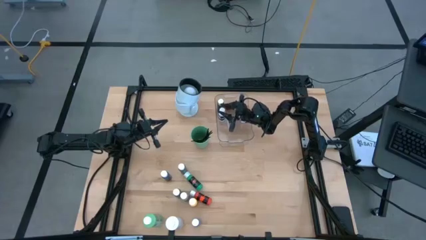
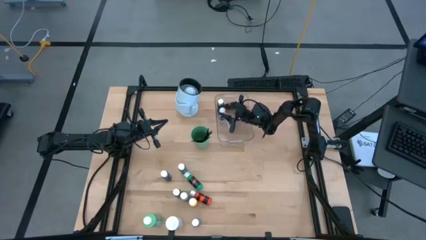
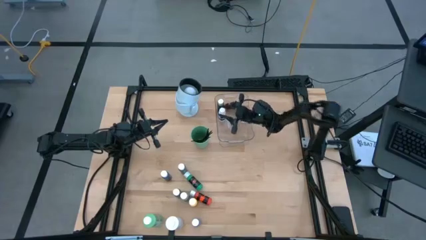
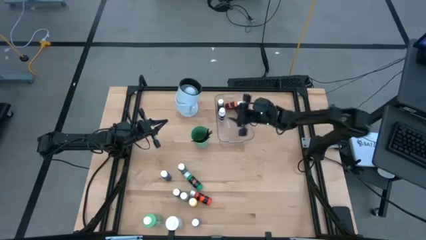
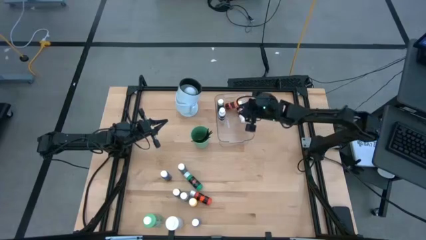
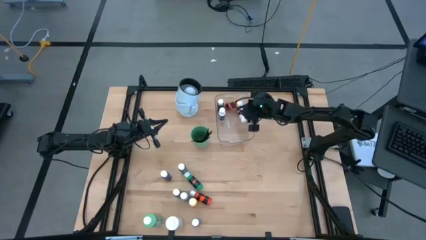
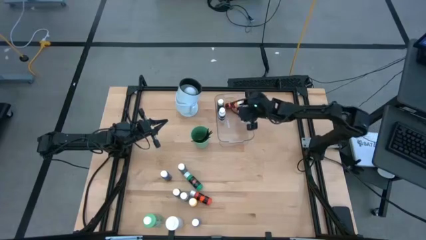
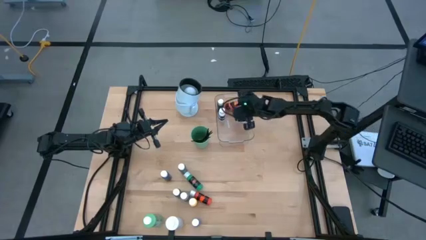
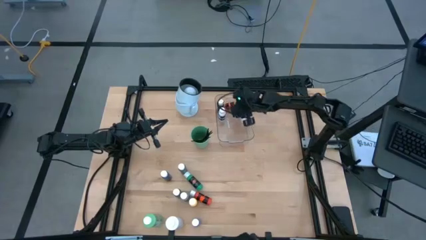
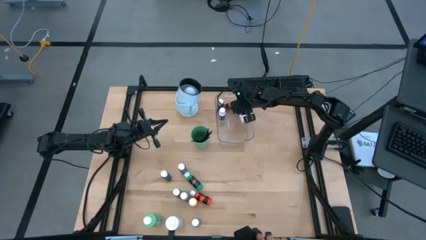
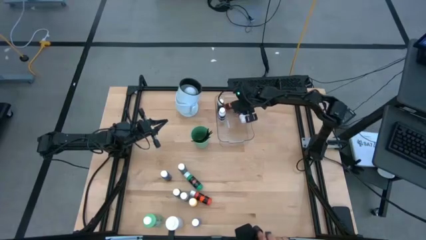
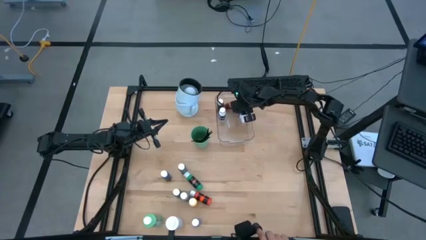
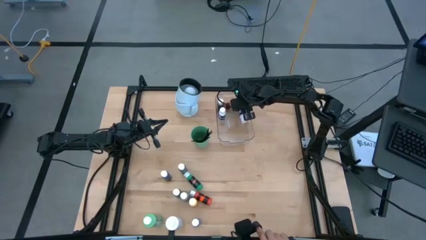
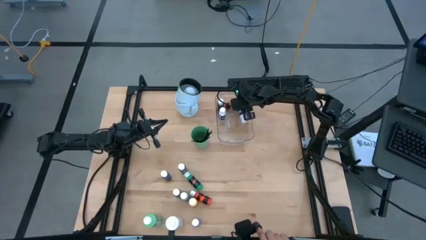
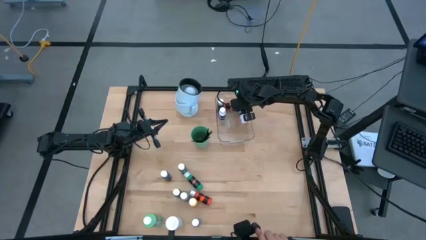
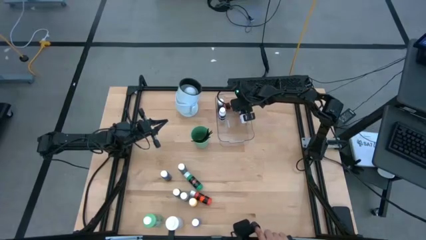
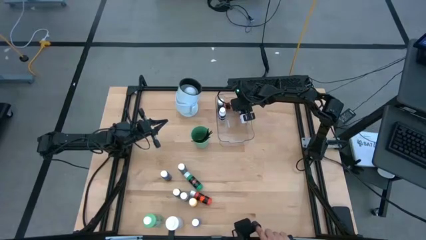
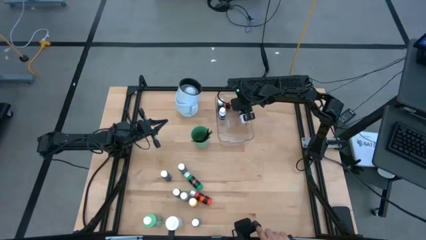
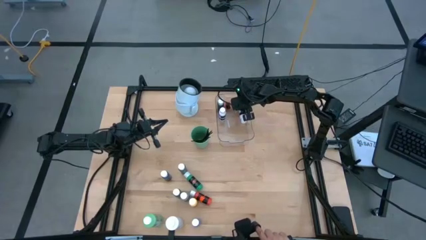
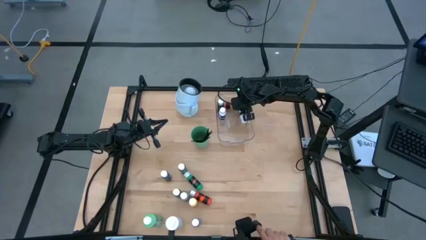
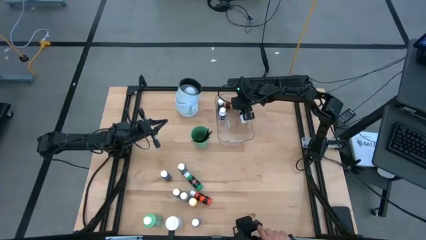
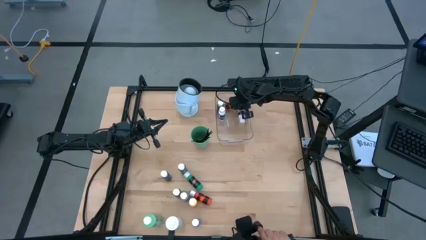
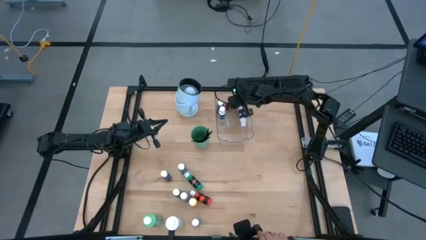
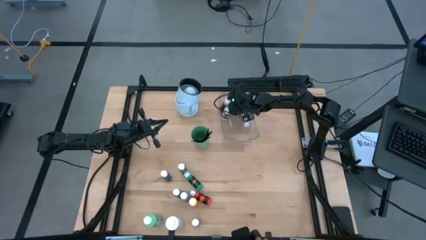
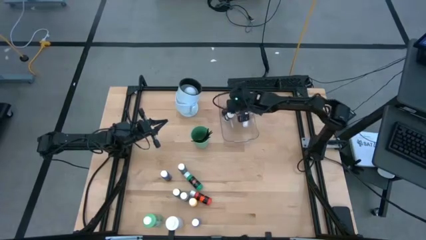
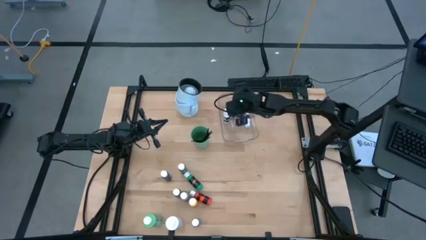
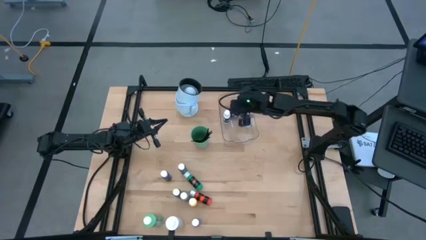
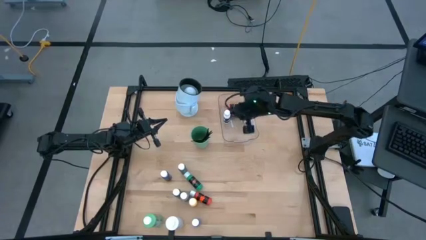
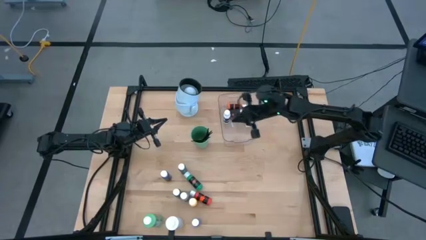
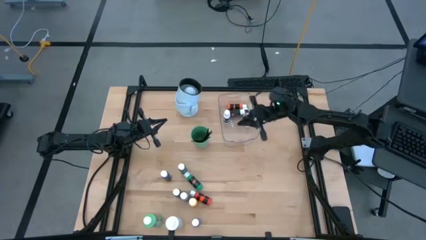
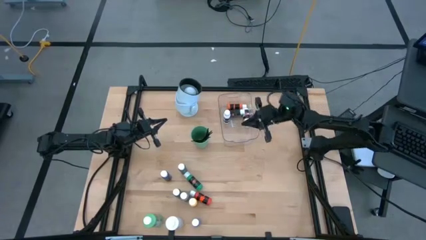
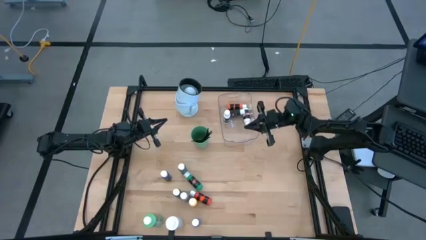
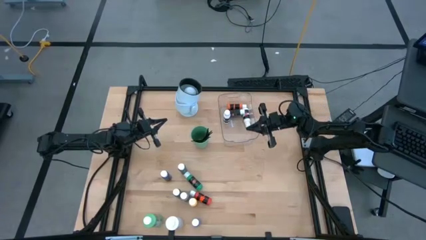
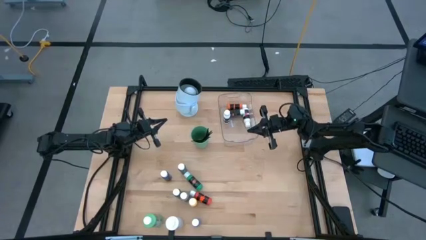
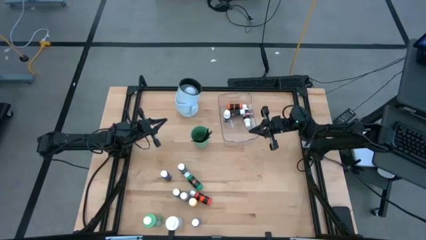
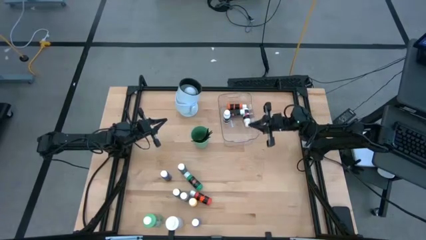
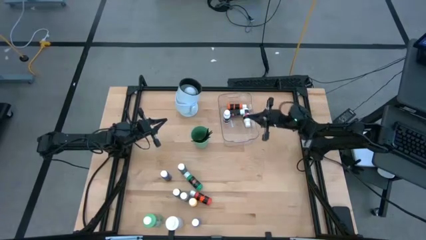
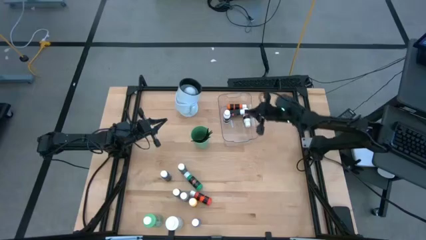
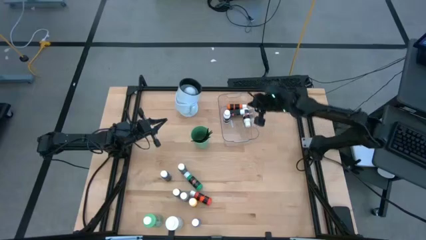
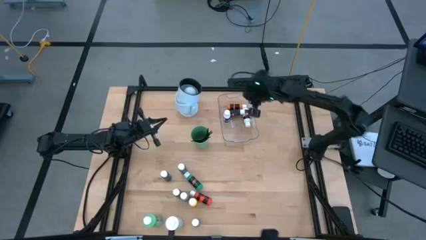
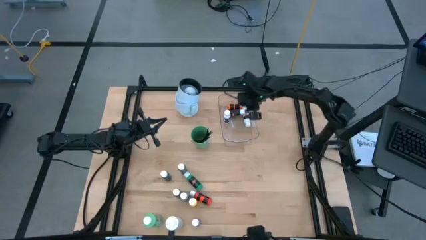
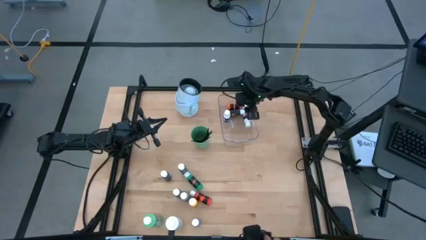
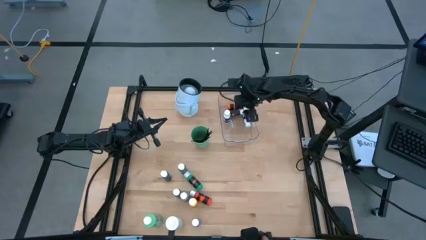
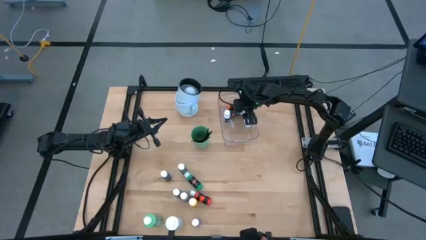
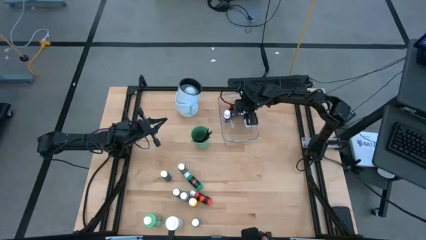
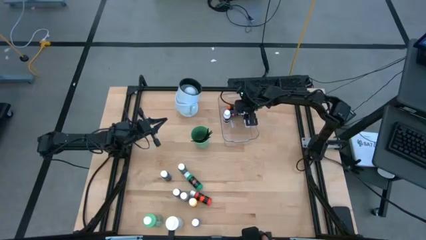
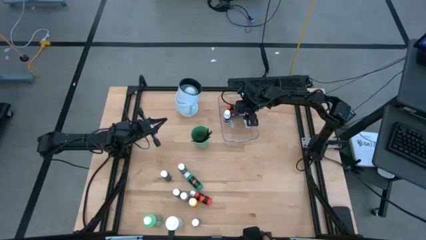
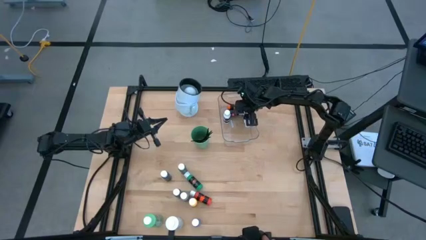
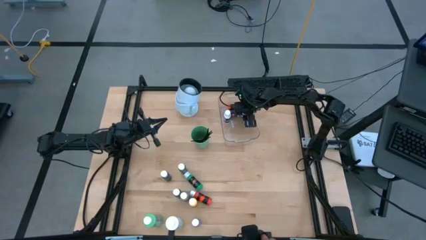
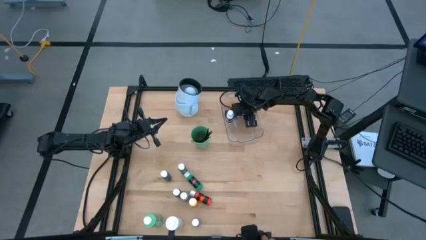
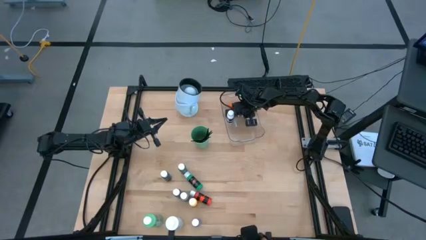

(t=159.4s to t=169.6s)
Task: Pick & Place Paint Supplies
Adjust the small black paint bottle in the transparent bin

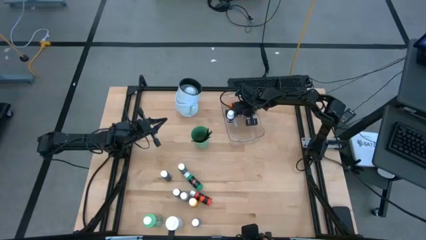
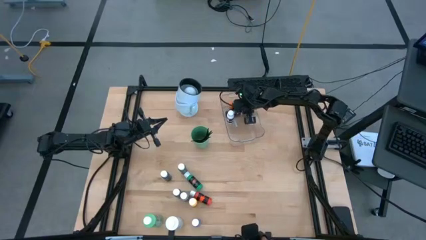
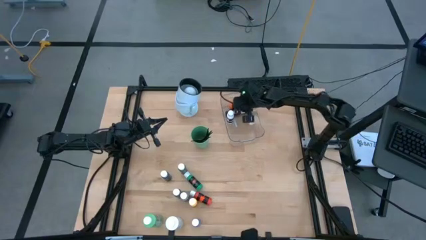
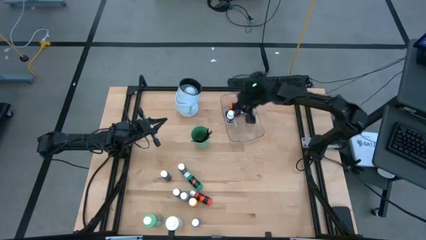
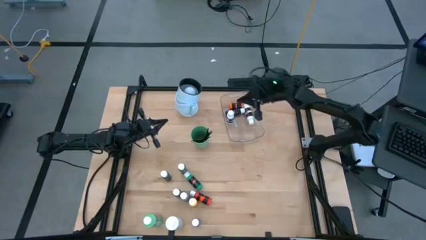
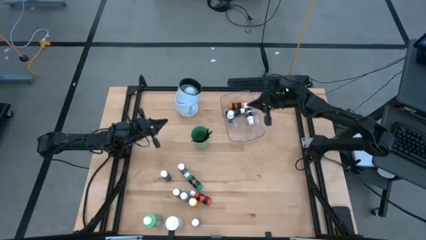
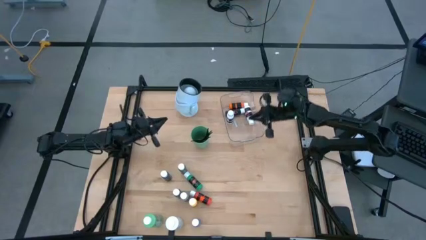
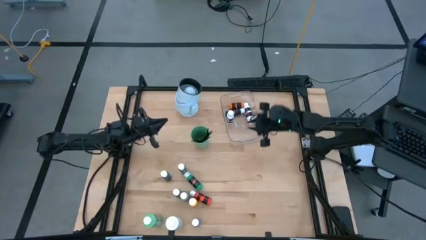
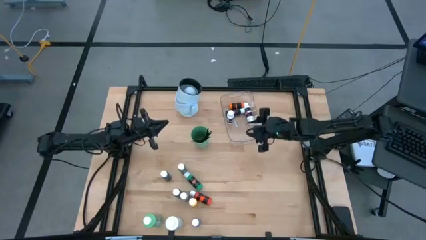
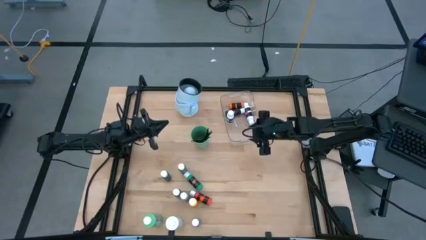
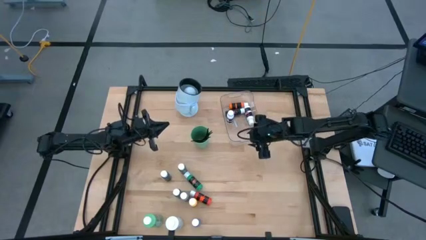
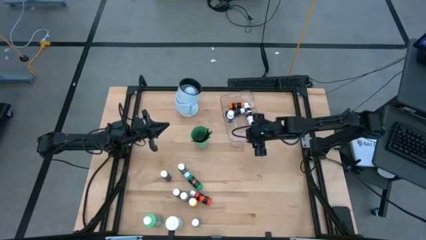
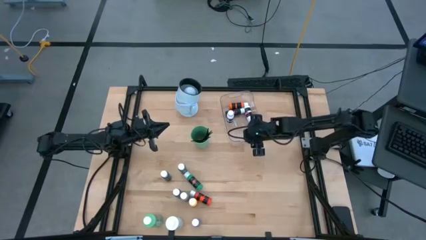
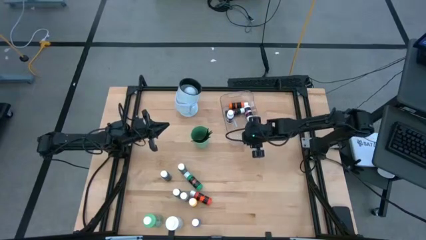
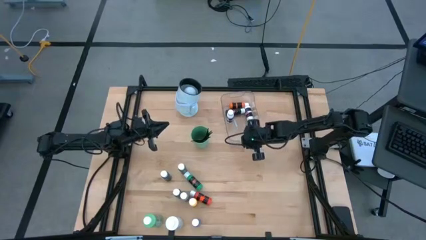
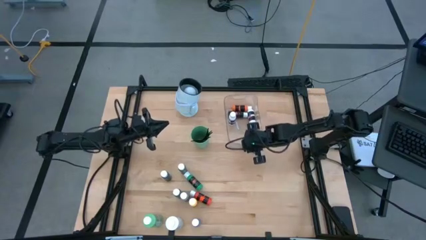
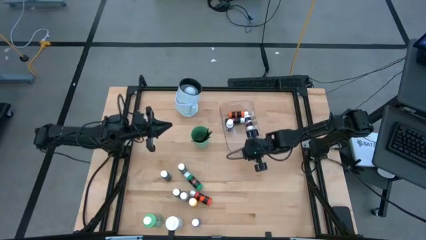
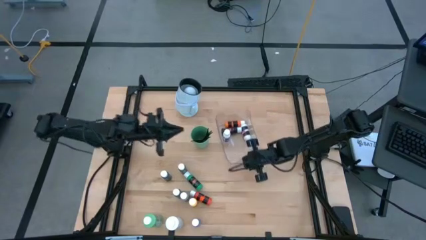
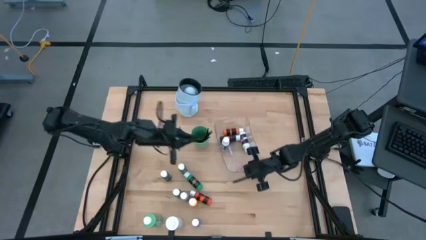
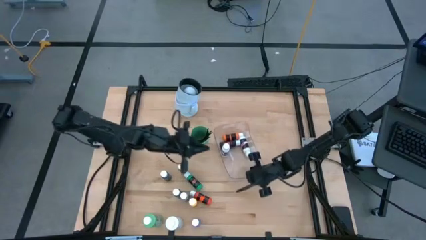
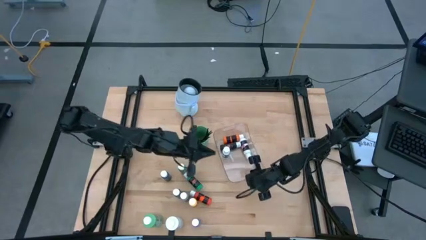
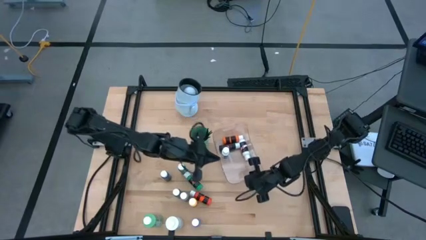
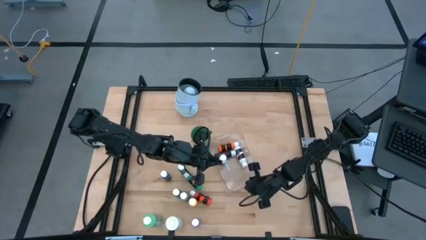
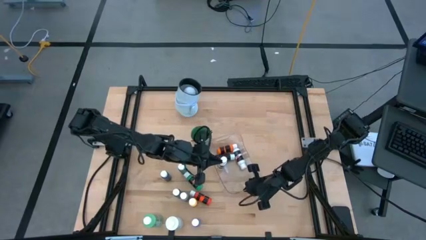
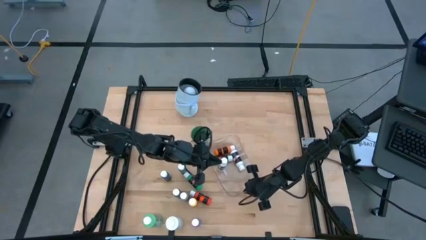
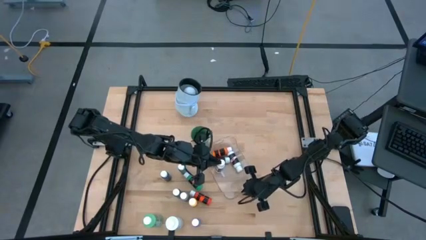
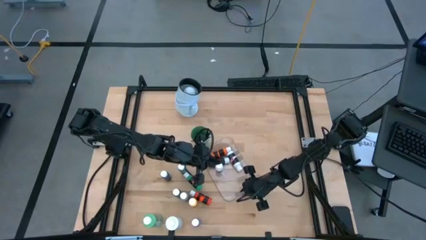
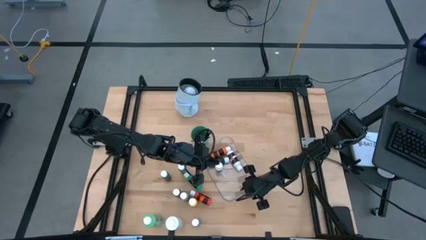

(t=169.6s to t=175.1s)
Move the transparent bin to the center of the table

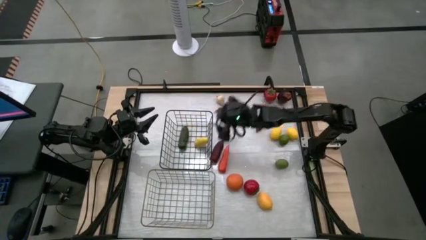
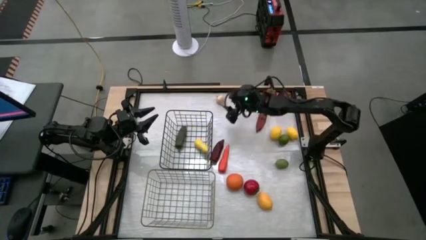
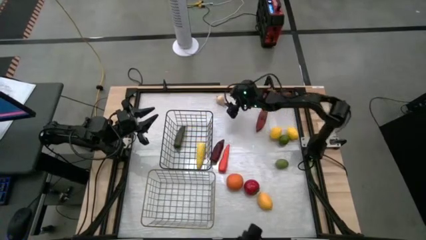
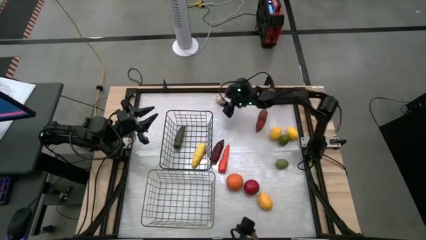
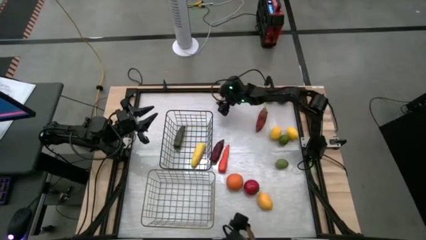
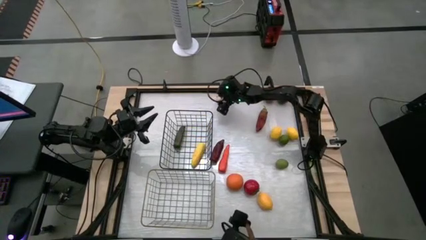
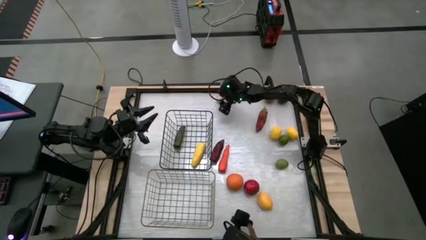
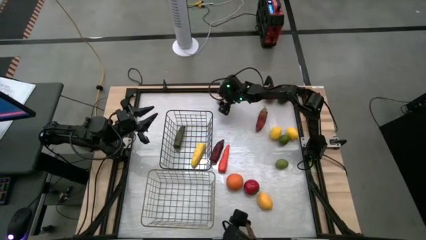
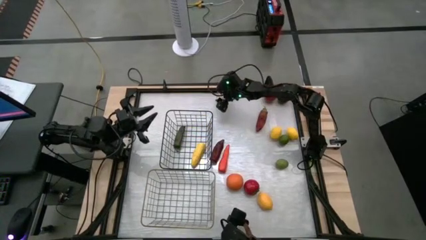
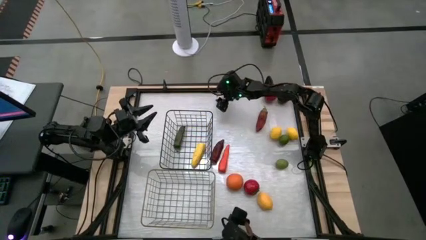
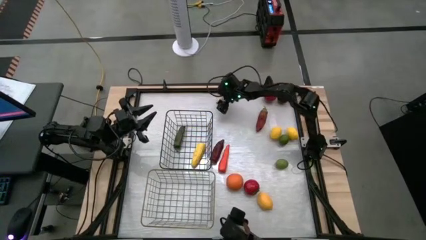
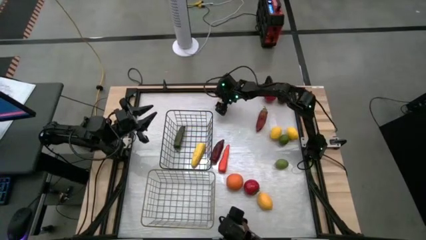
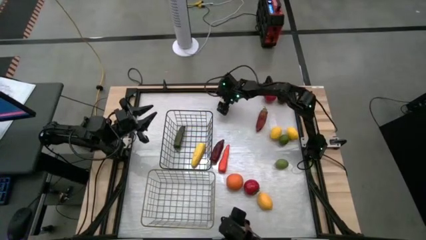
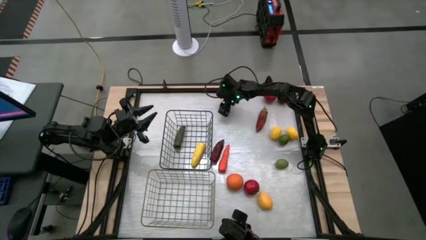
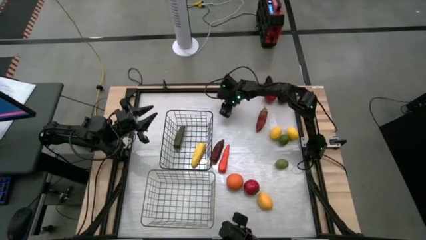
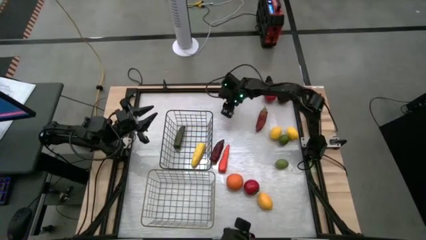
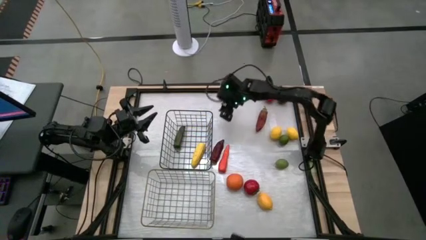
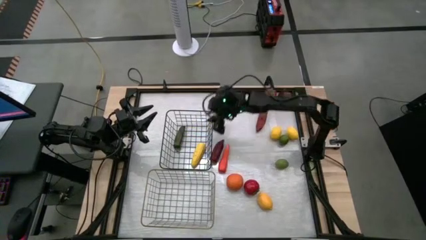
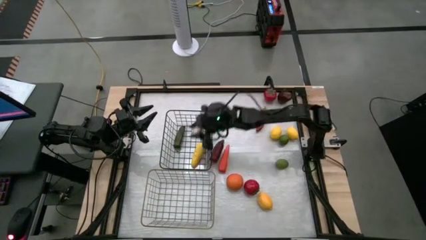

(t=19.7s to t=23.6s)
Task: Sort produce into baskets
Put the garlic into the black wire basket
